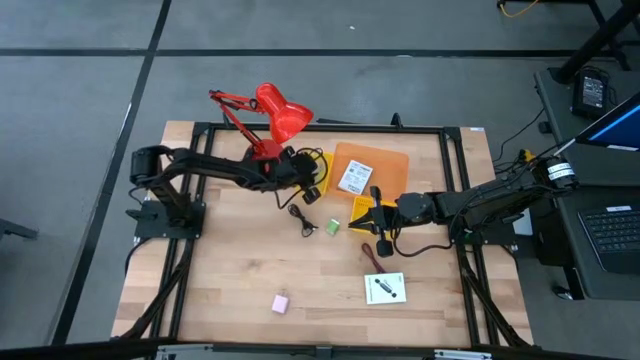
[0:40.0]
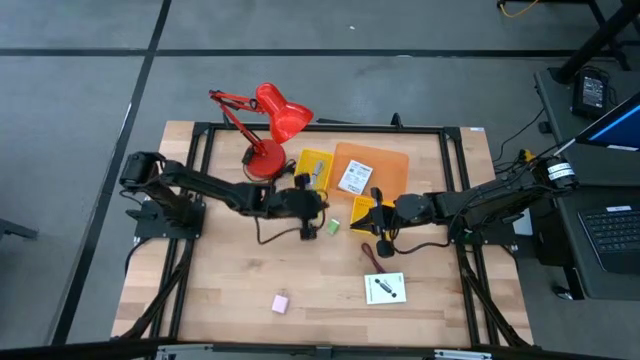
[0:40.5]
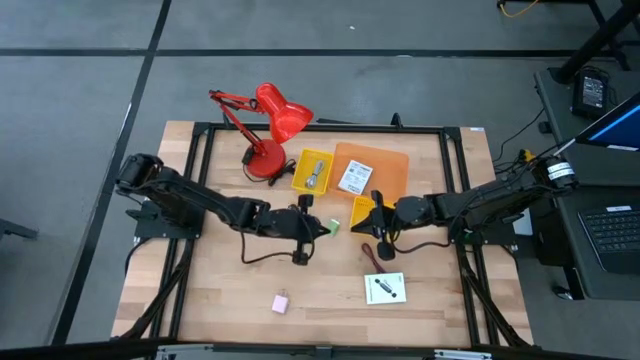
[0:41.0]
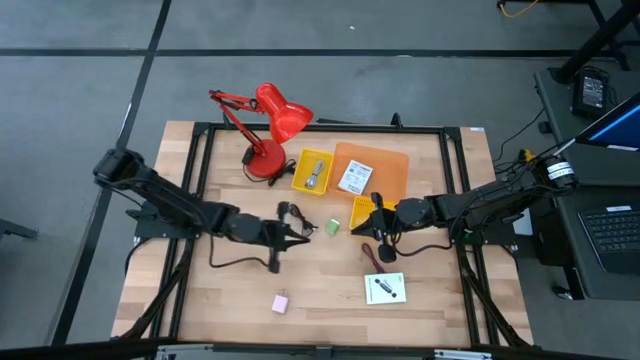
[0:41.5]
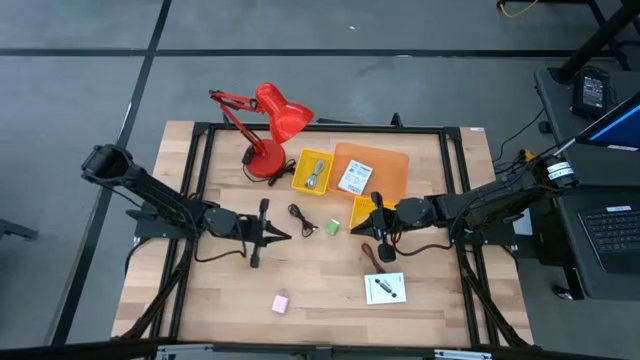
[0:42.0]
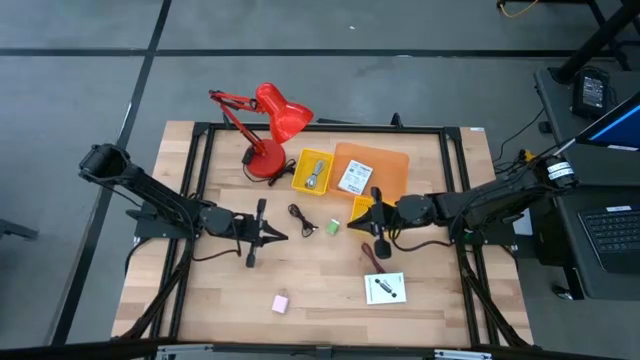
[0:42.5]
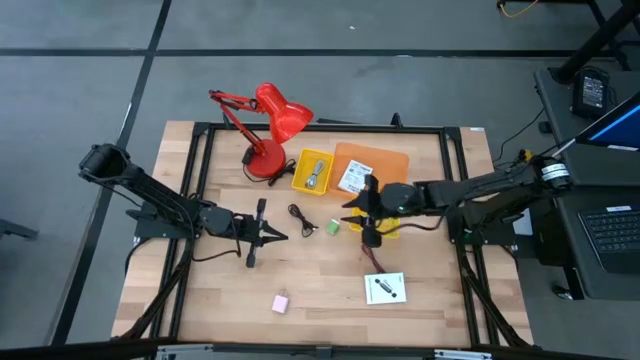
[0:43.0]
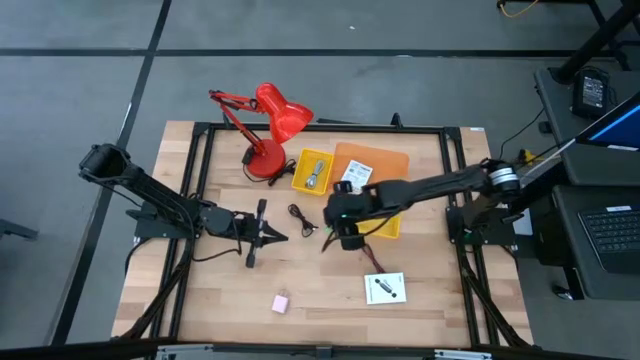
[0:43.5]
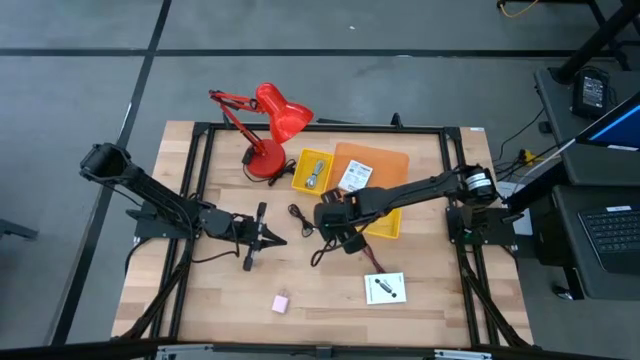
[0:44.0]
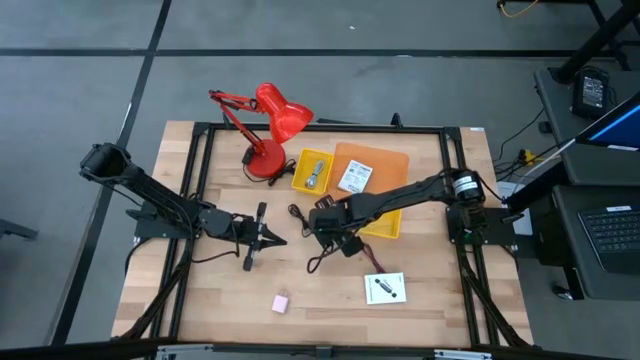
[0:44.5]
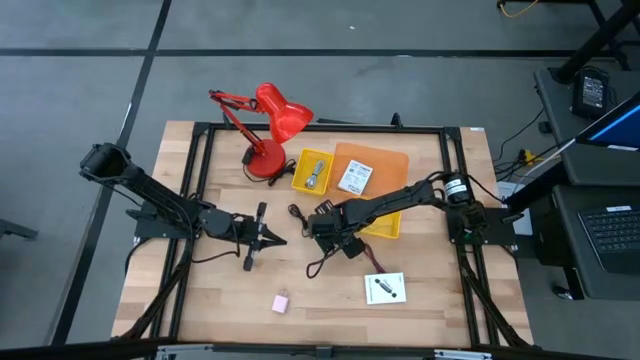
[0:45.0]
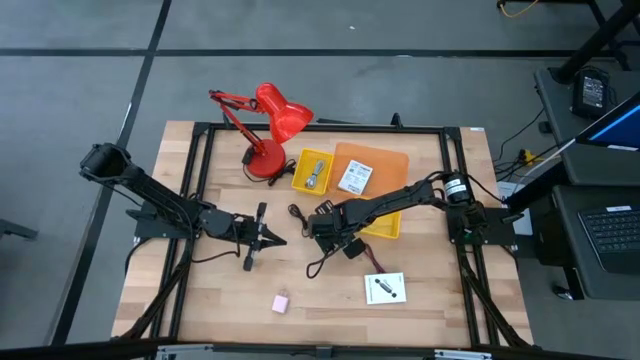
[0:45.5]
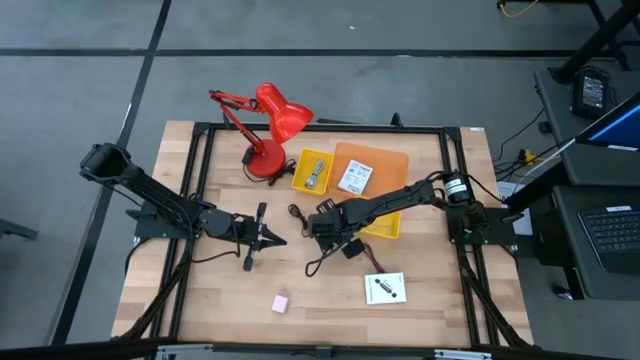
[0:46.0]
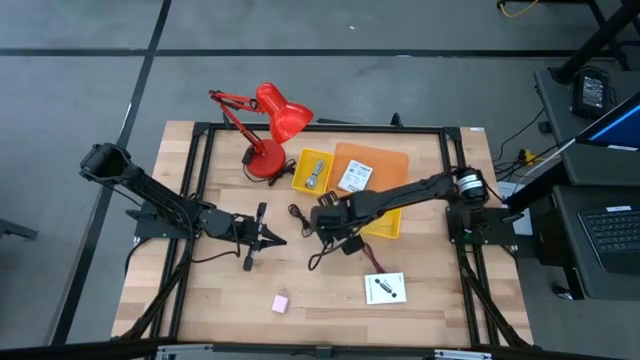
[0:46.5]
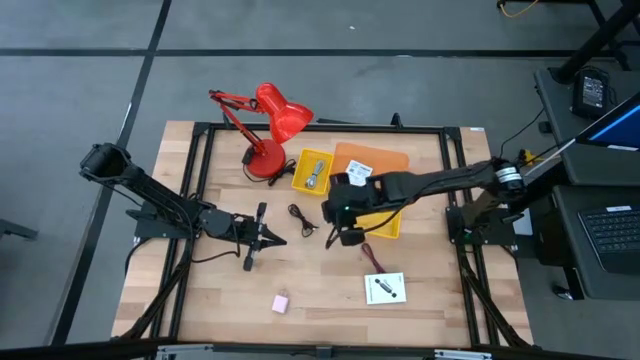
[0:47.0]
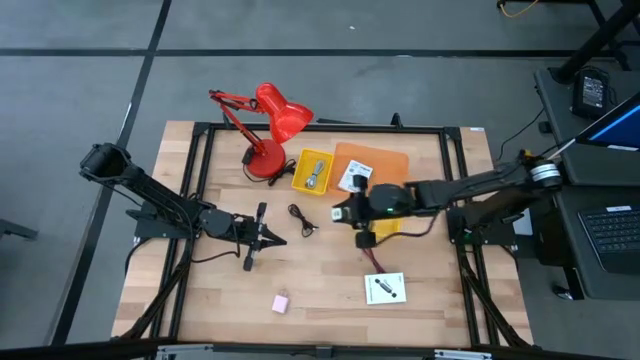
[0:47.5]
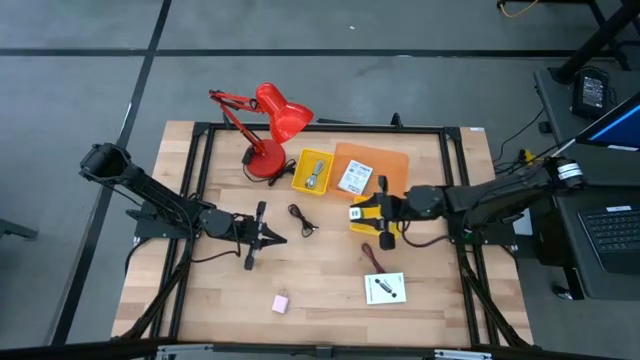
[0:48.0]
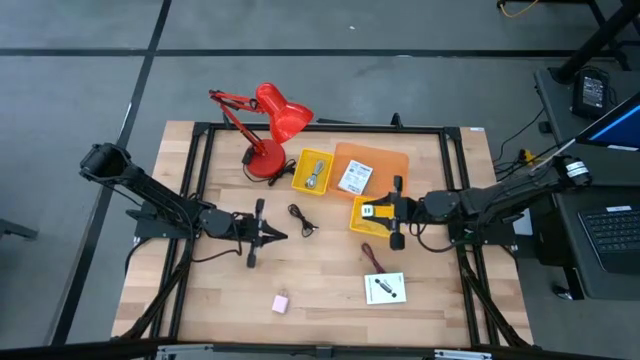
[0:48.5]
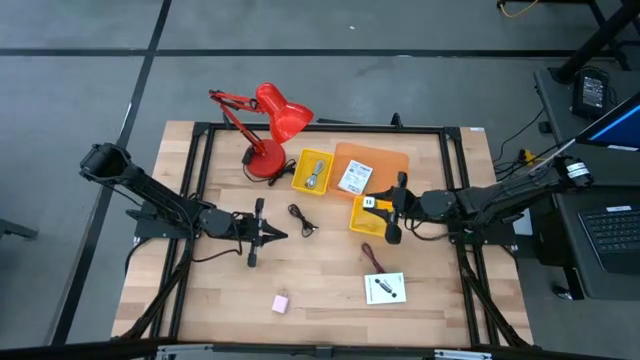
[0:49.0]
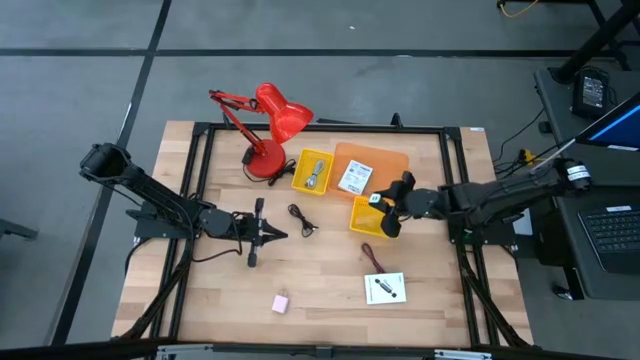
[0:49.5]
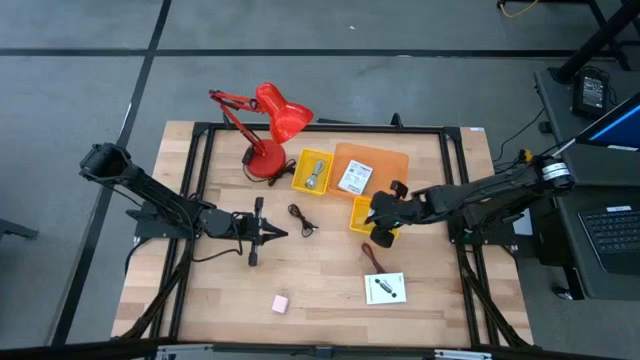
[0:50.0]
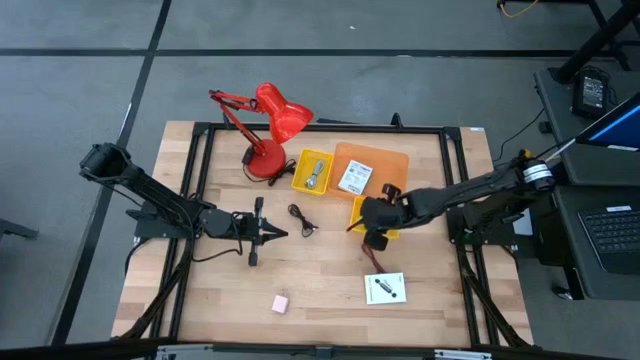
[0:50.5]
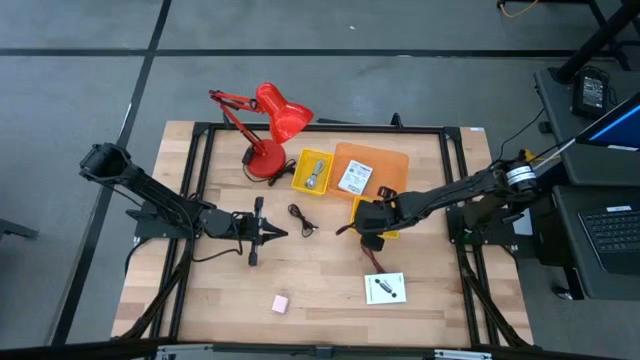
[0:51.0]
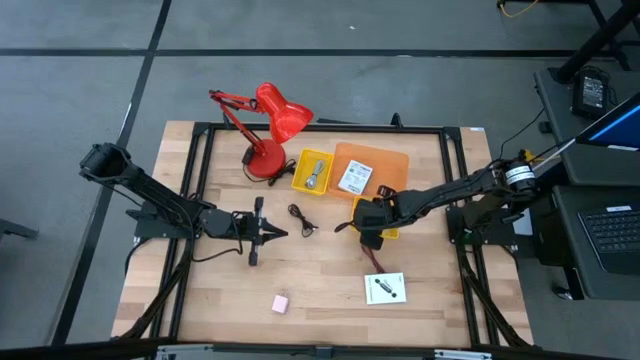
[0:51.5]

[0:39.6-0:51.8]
Task: Pick and place items into bin
Put the green wall charger into the right yellow basket

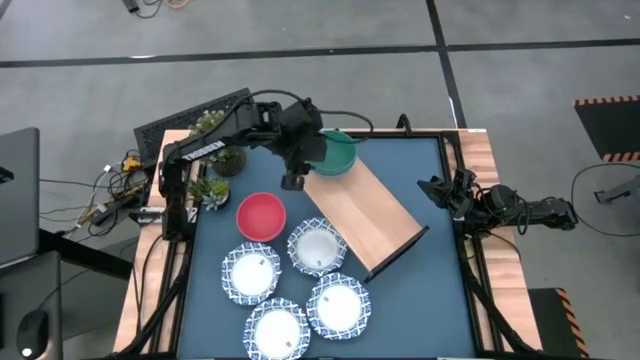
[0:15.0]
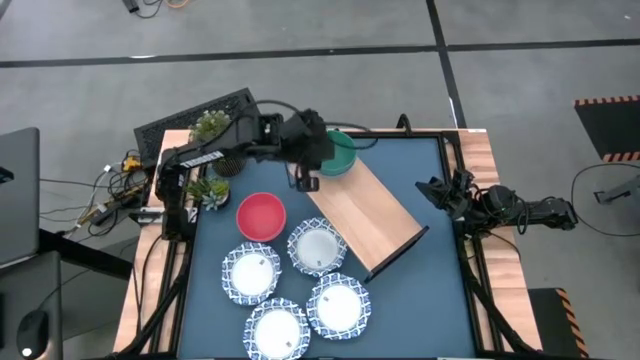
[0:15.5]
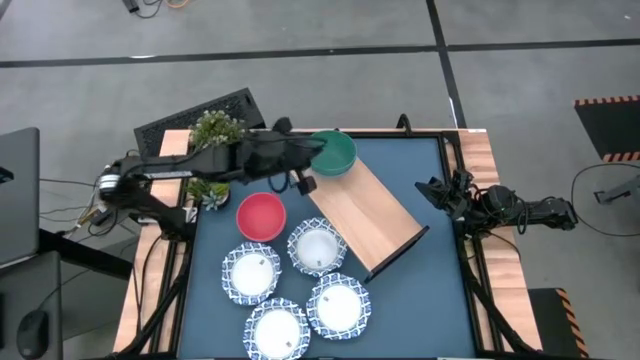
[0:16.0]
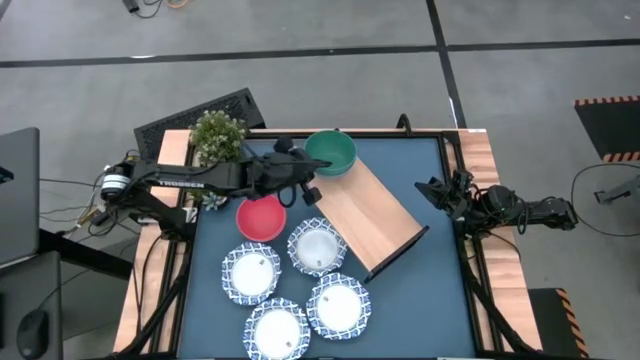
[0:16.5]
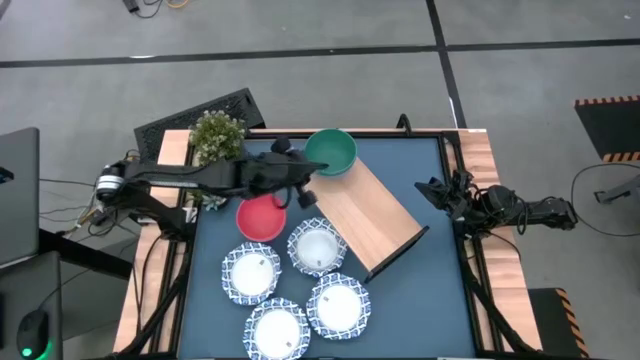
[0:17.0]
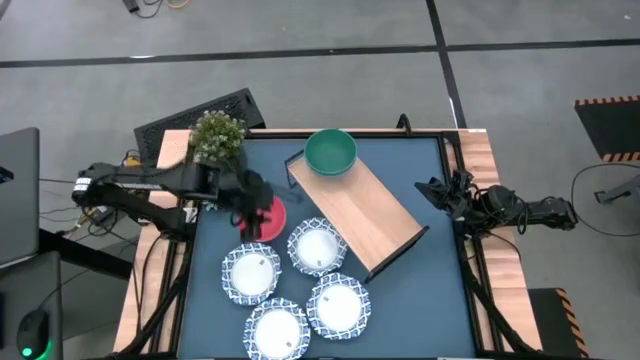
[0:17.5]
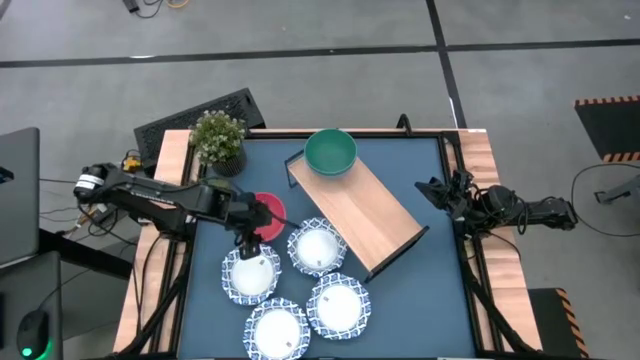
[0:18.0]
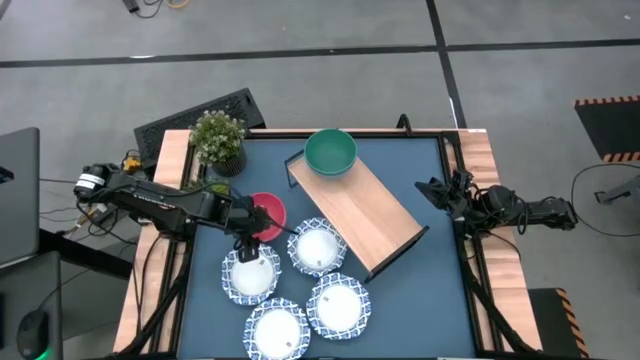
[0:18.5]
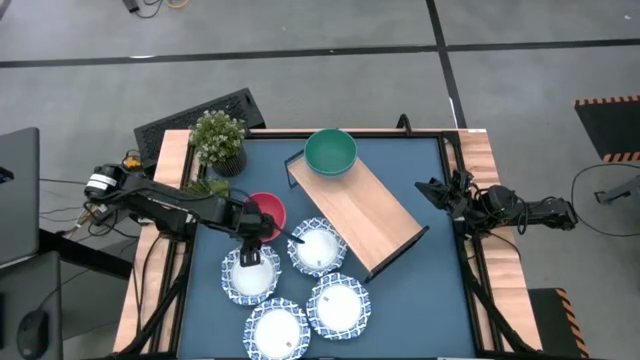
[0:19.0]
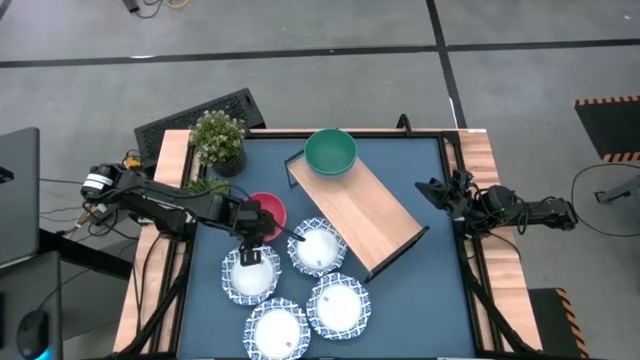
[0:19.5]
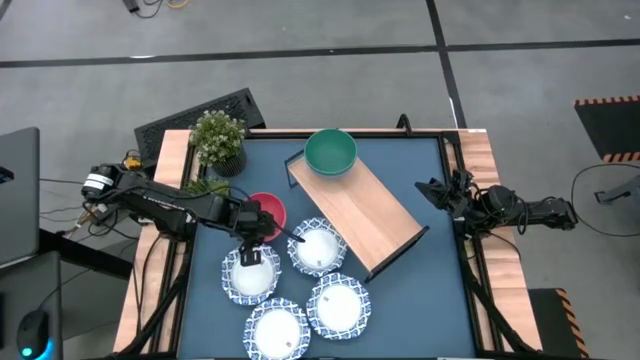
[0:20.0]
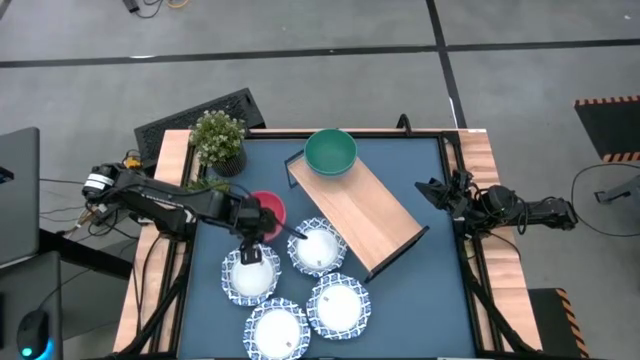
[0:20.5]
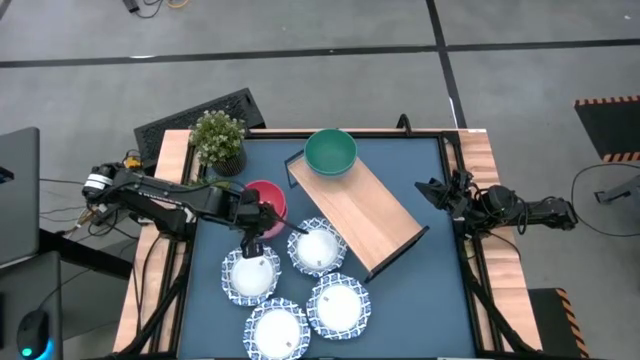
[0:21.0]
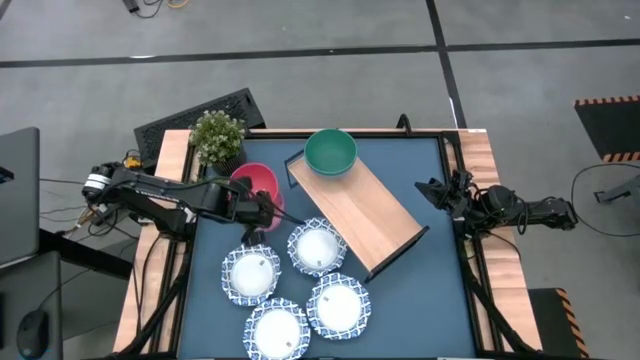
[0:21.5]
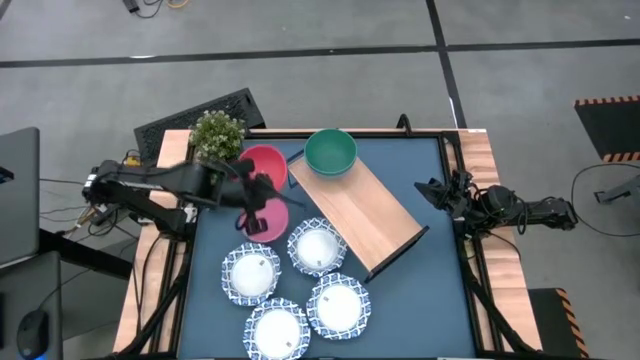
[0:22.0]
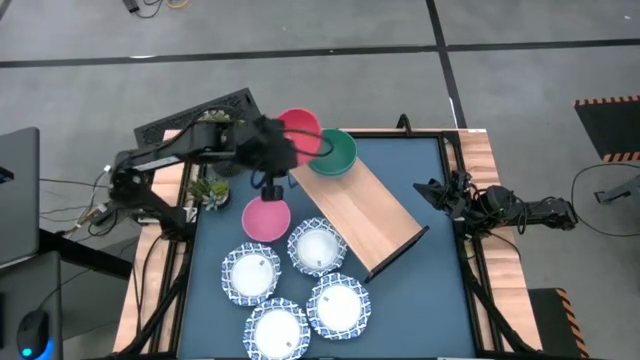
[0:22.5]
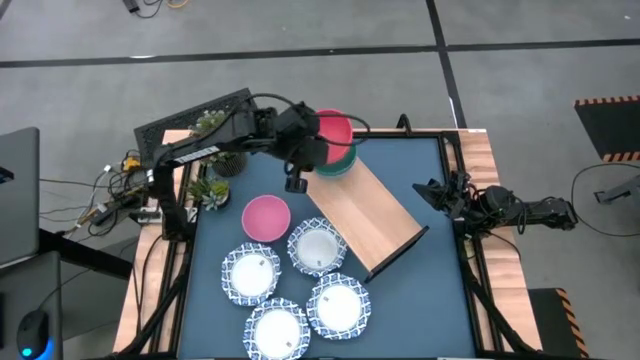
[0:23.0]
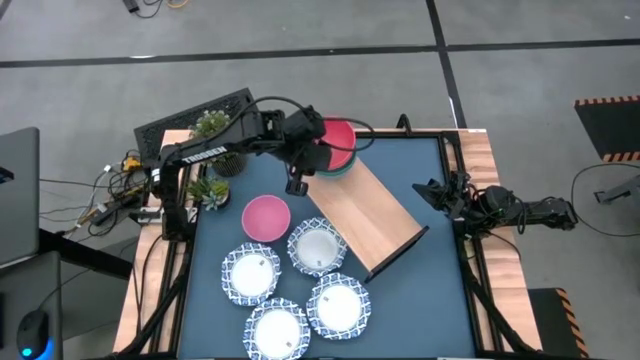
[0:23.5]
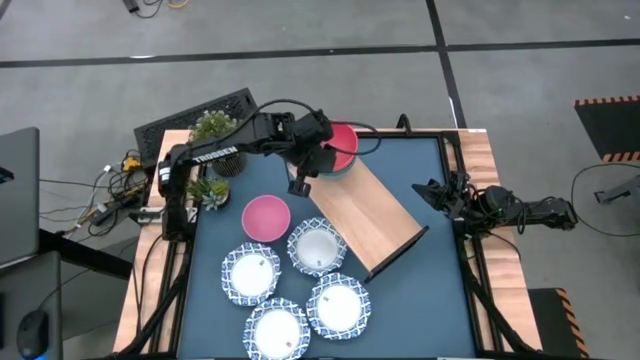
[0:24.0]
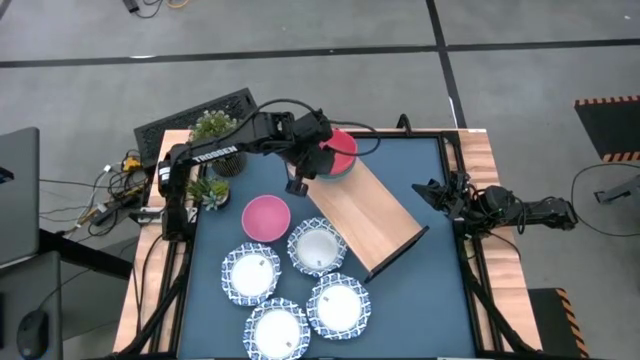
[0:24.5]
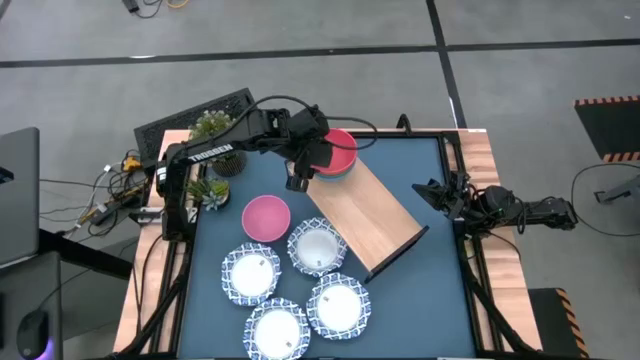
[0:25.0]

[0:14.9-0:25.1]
Task: Place and stack plates onto a shelf
Stack the red bowl on top of the green bowl on the shelf
